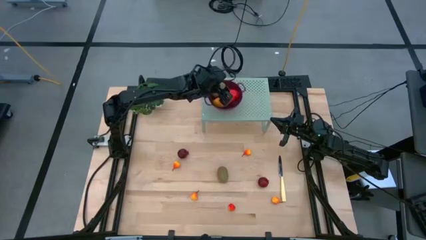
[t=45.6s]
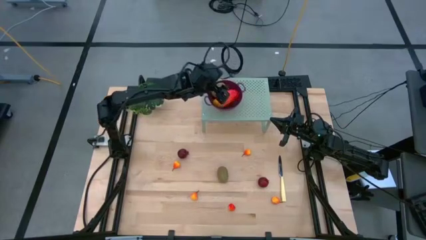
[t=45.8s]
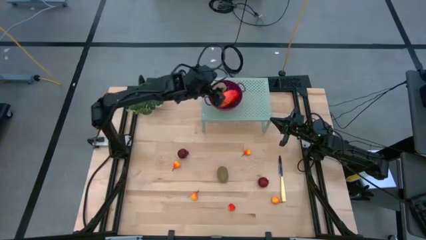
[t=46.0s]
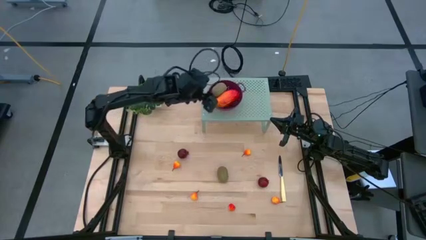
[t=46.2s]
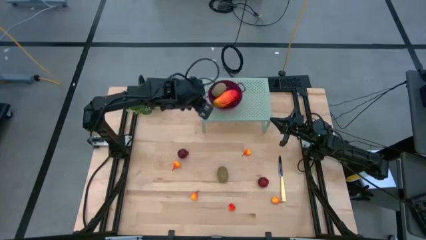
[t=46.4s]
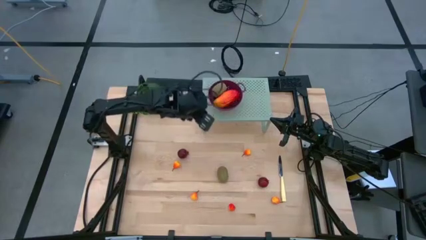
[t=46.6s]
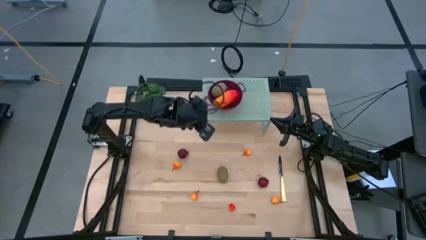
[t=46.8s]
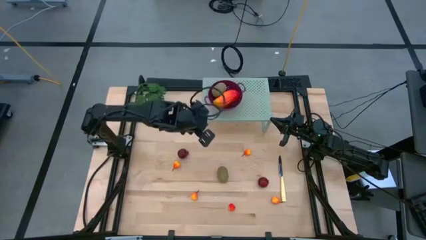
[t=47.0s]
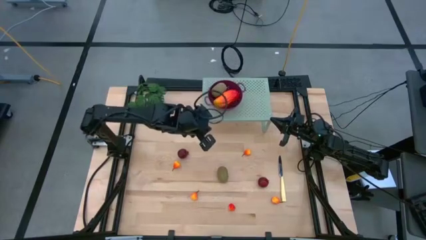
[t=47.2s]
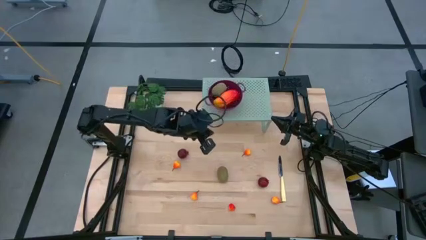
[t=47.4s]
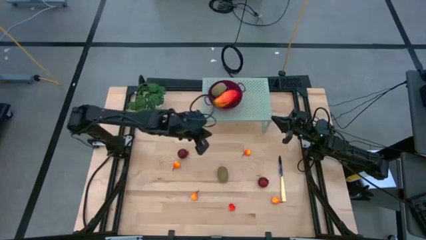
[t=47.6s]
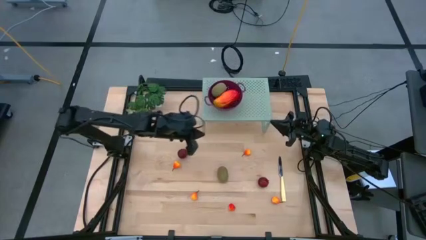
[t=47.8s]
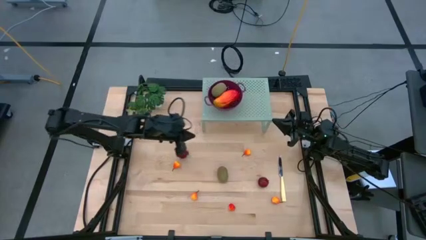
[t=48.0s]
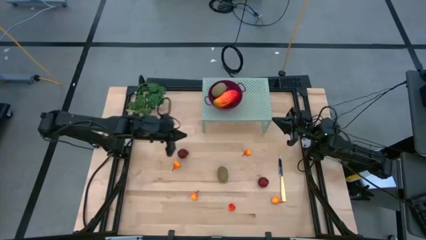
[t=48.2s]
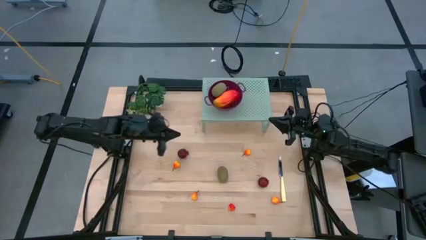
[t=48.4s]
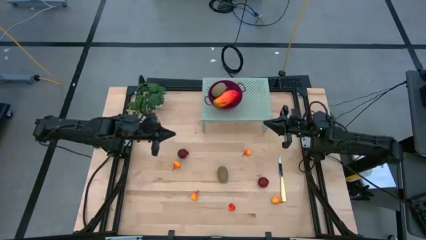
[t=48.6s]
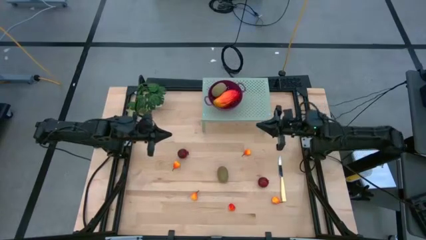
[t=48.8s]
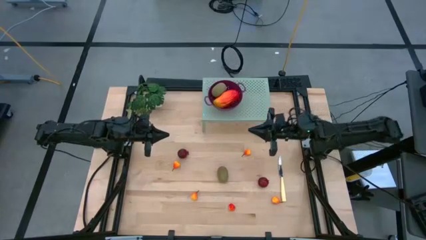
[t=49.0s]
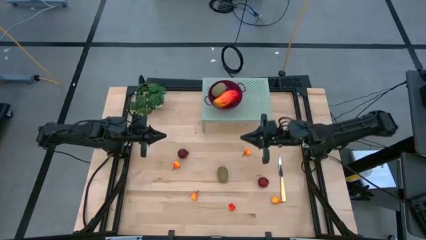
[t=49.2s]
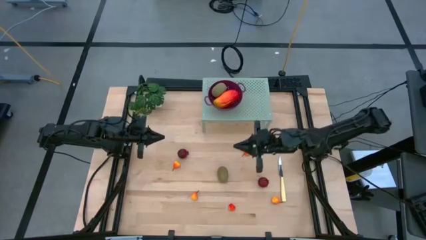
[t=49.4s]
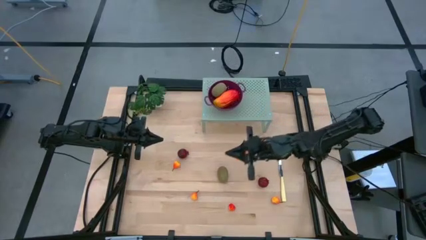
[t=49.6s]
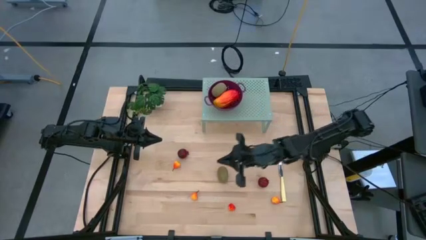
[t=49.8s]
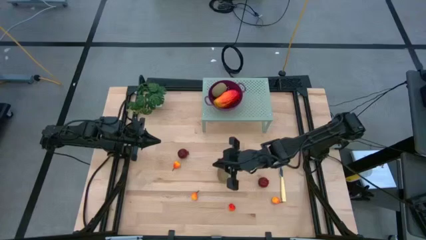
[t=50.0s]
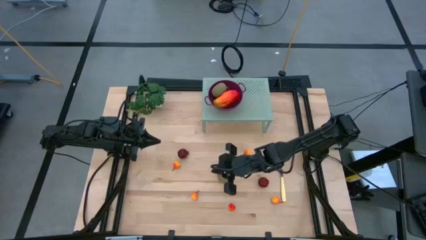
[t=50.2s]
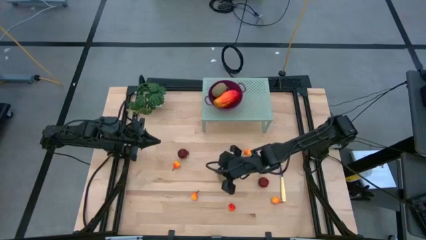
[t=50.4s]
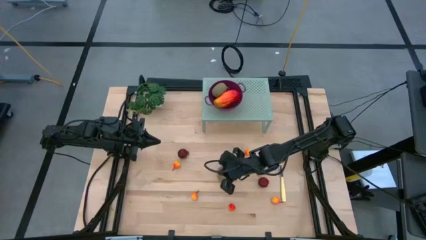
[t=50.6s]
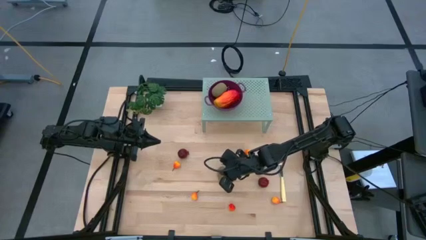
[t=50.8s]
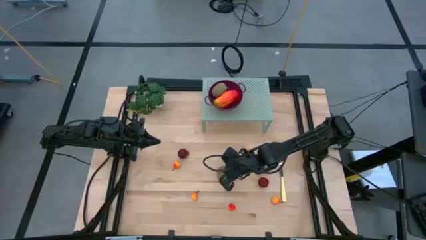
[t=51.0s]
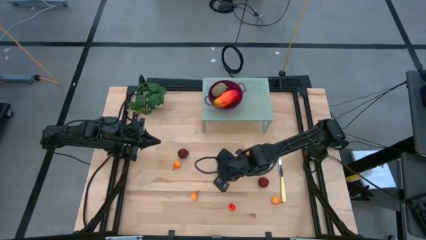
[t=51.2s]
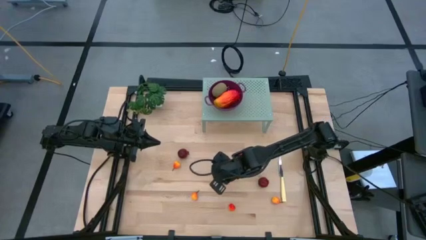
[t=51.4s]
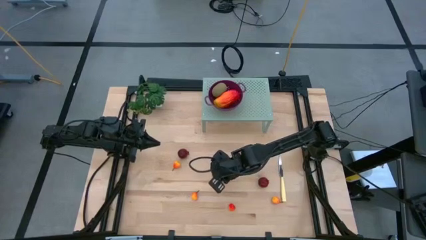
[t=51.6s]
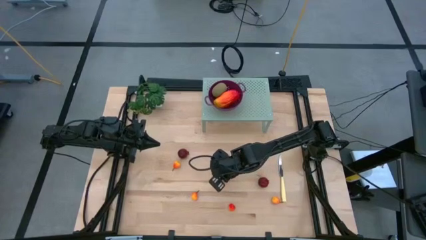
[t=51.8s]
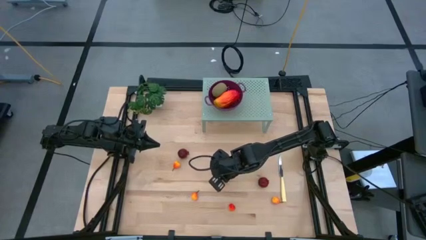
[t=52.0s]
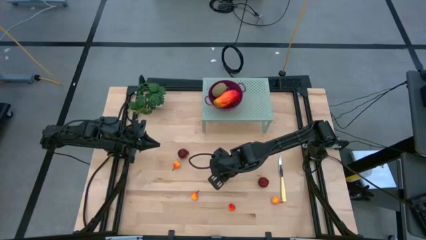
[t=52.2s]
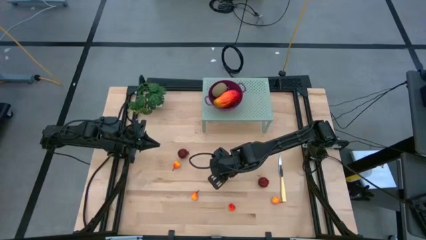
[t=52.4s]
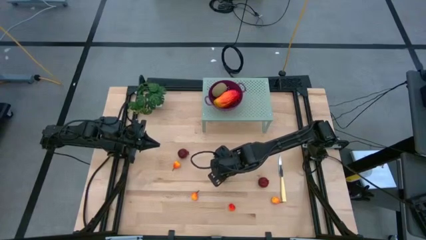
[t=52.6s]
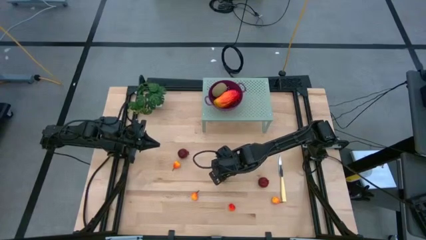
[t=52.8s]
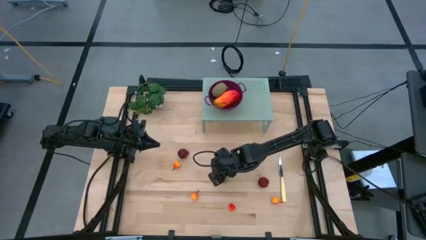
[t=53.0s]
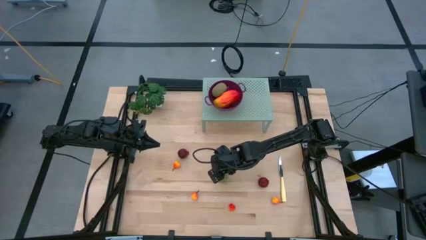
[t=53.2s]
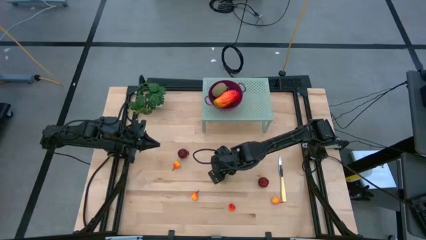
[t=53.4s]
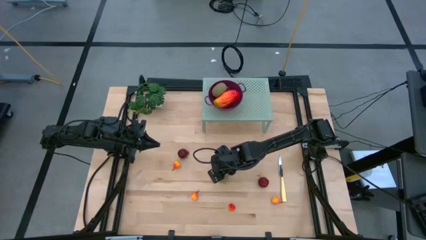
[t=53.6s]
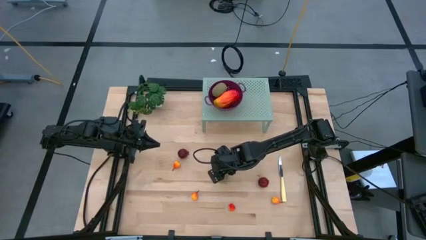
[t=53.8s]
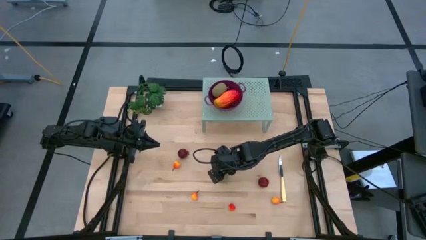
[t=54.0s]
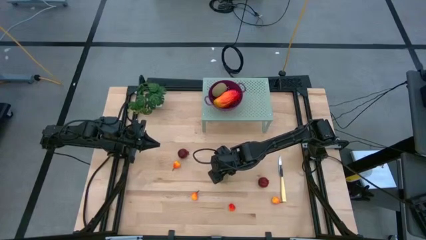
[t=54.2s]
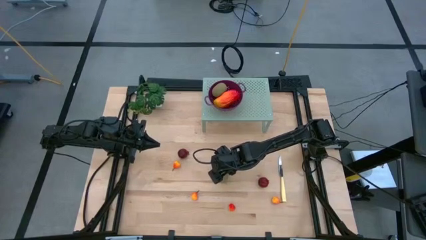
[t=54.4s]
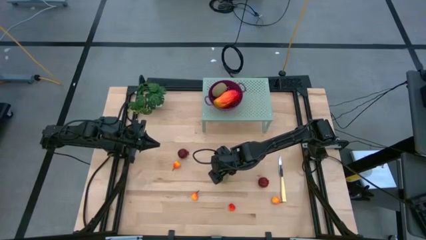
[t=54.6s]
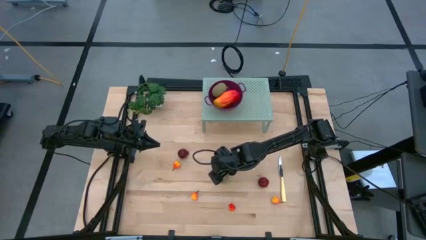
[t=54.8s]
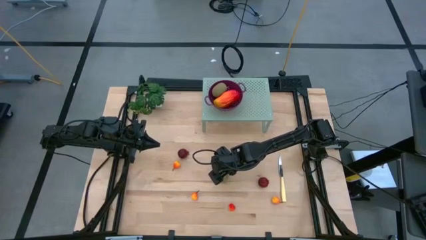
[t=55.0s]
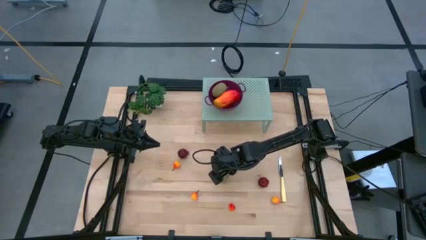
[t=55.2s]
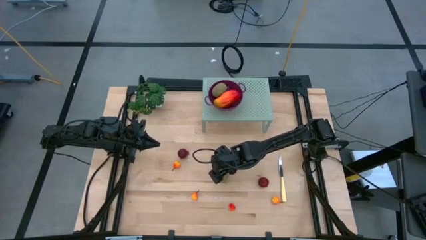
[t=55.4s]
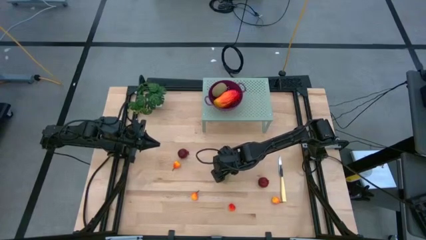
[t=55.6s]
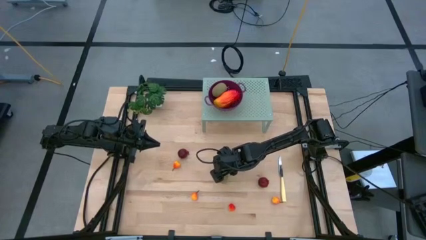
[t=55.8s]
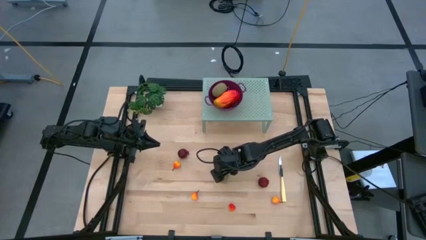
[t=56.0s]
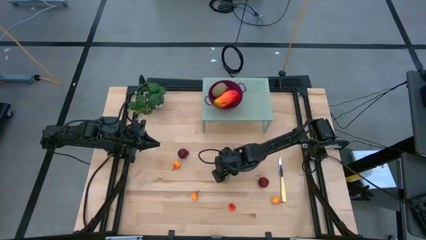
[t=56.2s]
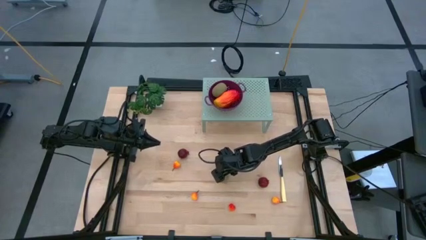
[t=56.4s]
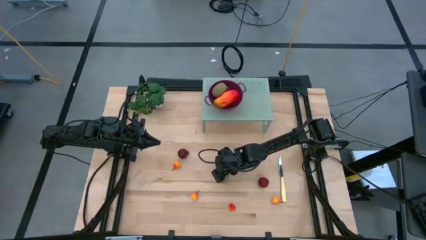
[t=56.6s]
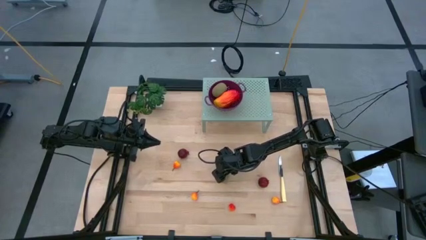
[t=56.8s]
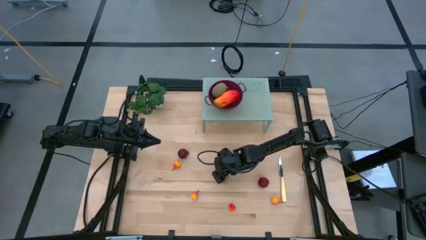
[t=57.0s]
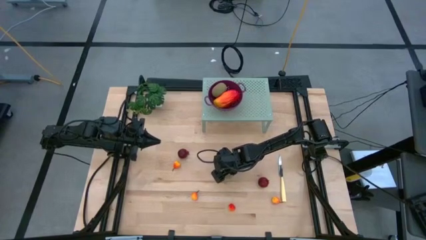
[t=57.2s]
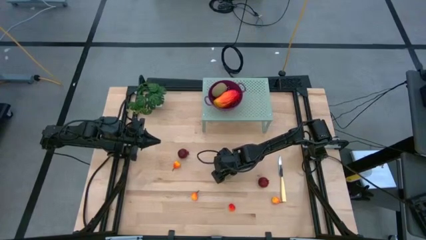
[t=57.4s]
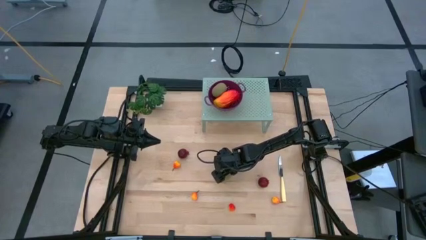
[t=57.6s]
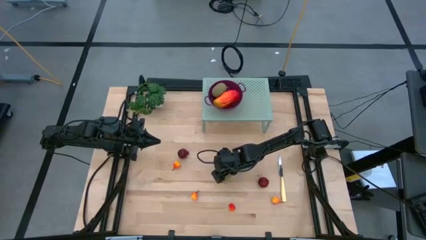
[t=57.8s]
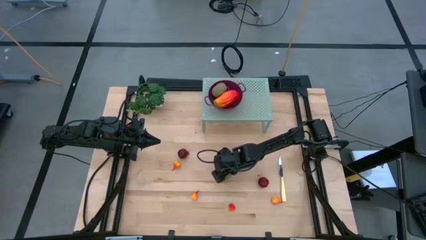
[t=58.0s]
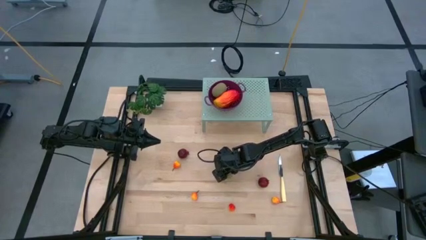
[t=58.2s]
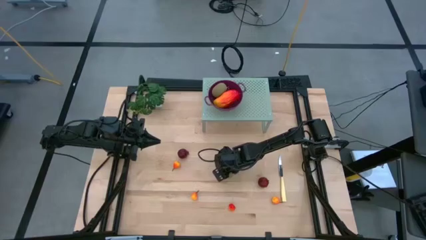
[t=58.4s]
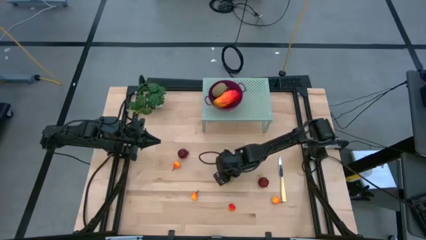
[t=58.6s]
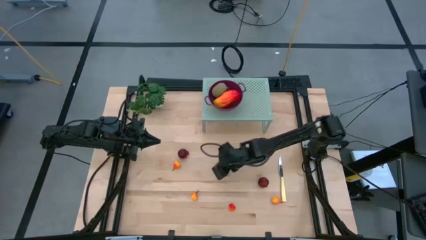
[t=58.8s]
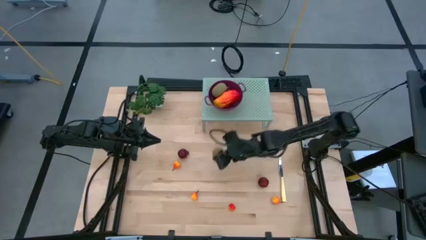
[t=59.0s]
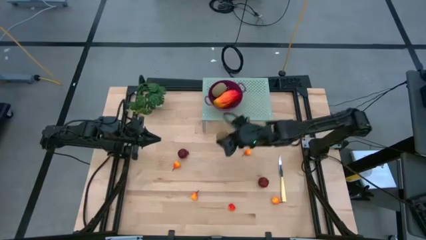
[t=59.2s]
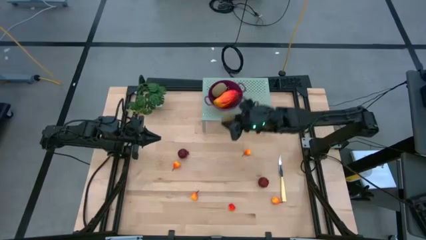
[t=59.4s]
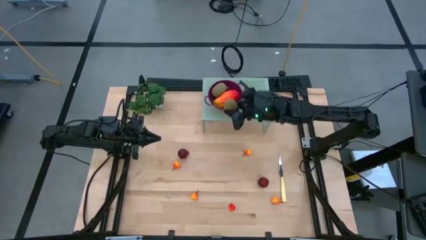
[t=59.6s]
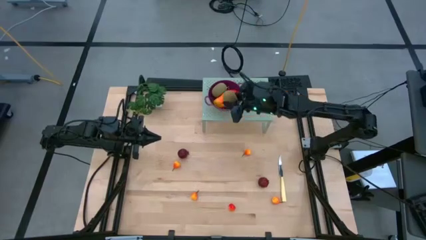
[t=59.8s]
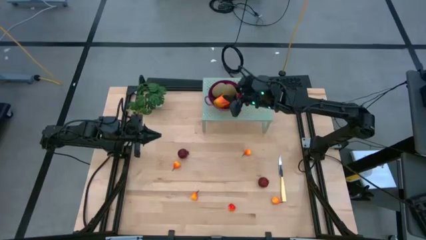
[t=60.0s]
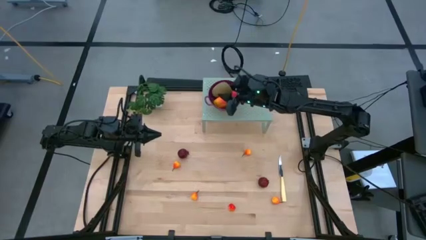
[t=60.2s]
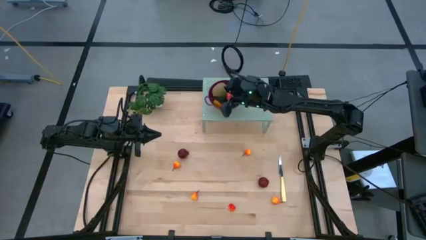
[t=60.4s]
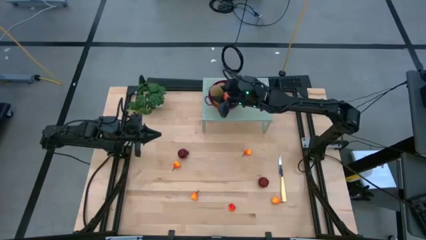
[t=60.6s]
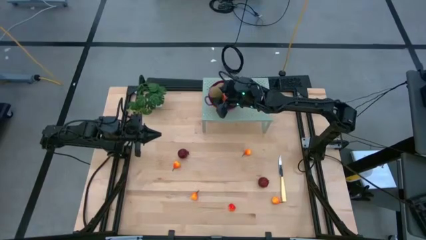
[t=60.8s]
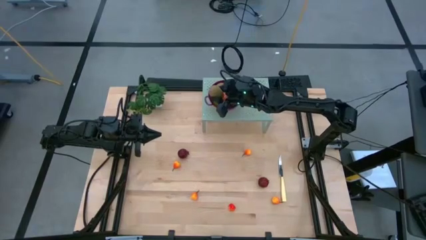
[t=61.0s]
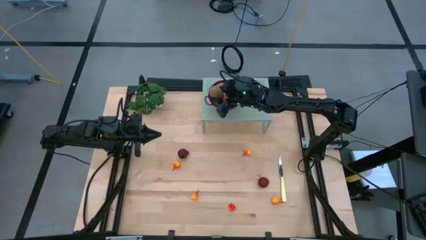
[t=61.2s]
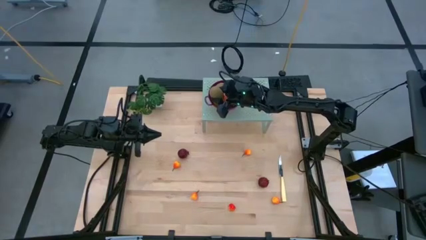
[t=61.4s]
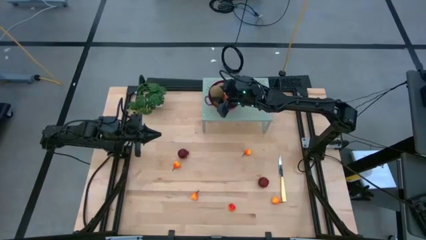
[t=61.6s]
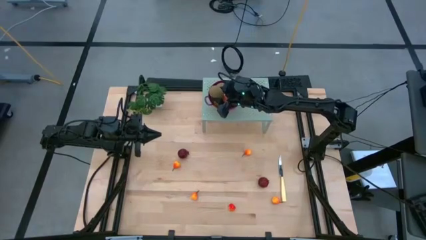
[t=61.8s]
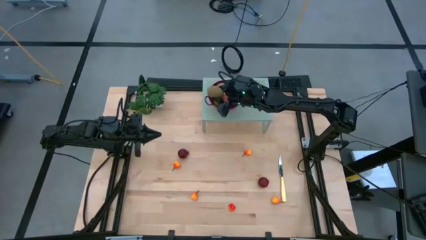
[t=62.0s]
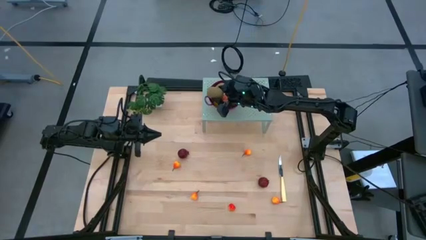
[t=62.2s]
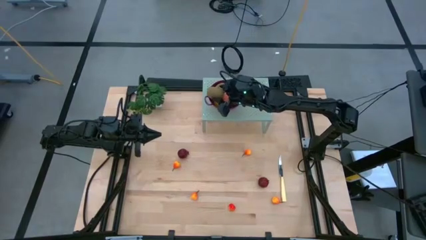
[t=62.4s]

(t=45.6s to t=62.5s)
Task: Pick & Place Fruit
Put the kiwi in the violet strainer bowl on the shelf
